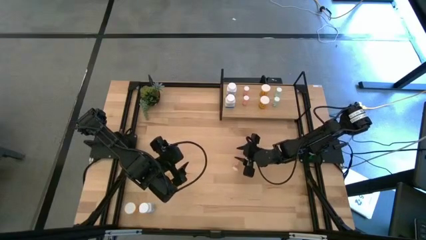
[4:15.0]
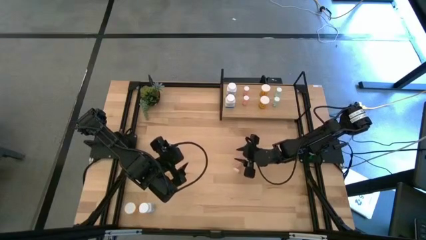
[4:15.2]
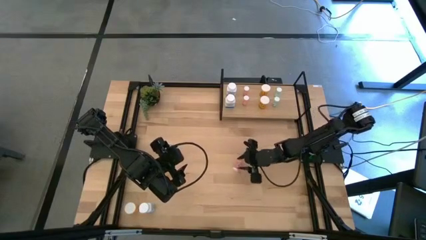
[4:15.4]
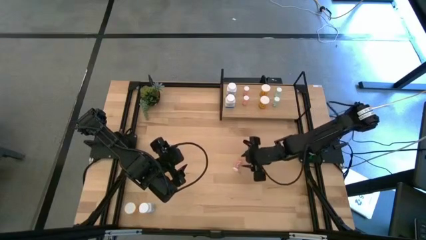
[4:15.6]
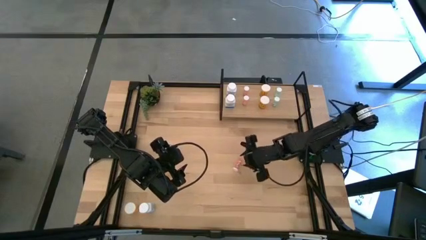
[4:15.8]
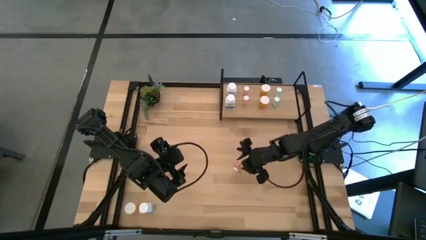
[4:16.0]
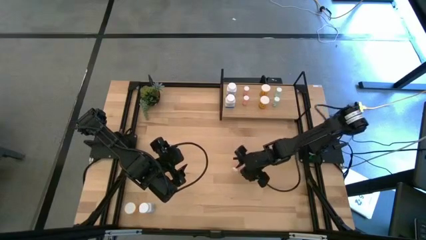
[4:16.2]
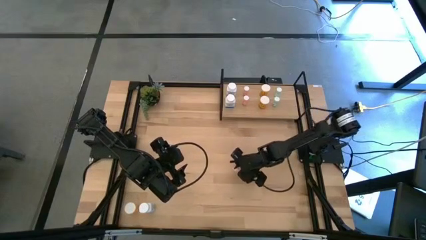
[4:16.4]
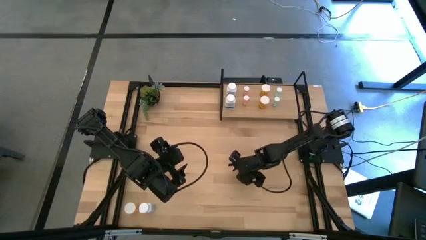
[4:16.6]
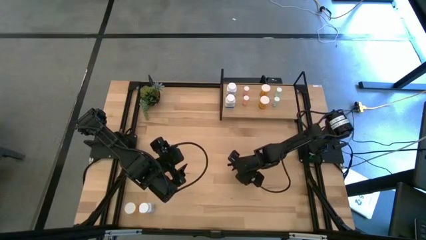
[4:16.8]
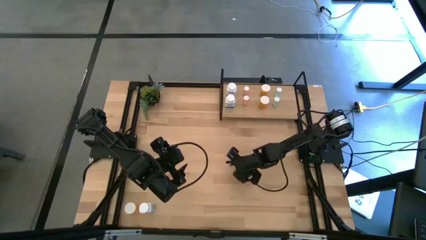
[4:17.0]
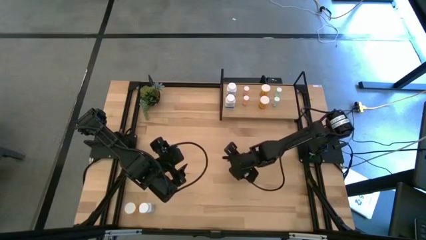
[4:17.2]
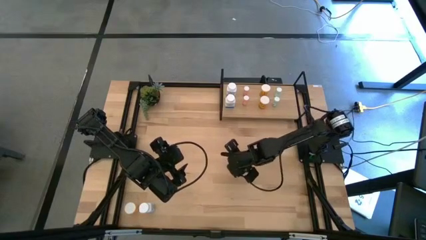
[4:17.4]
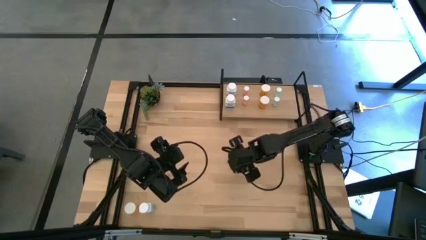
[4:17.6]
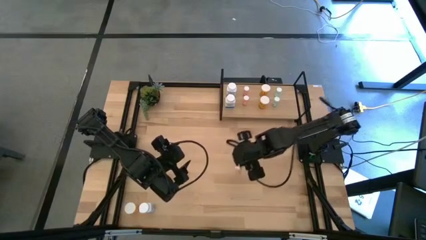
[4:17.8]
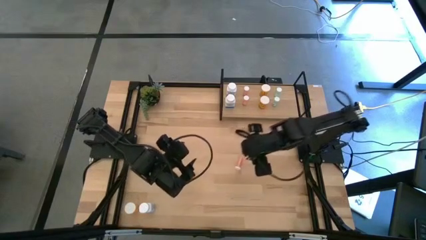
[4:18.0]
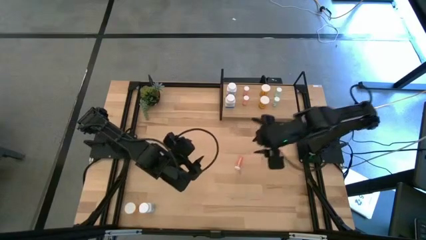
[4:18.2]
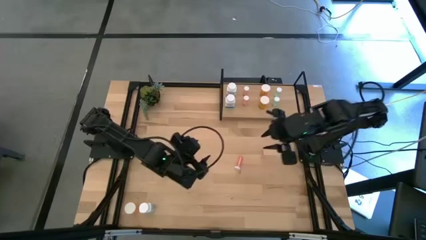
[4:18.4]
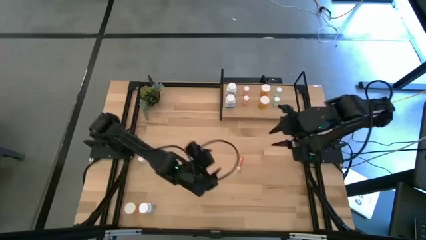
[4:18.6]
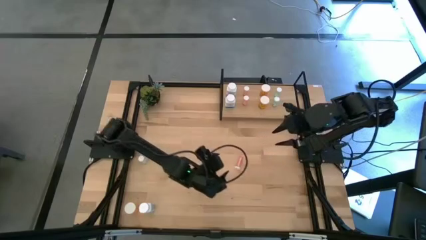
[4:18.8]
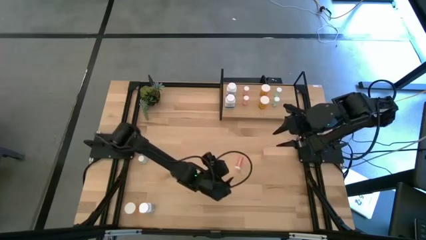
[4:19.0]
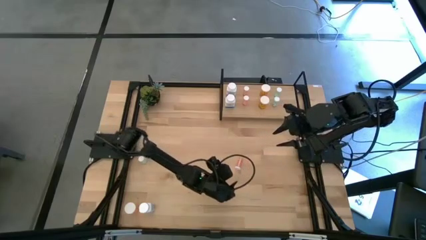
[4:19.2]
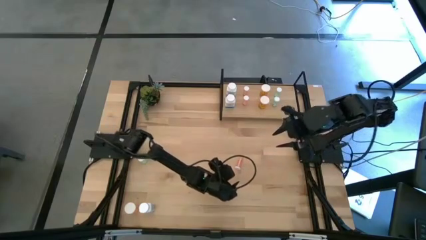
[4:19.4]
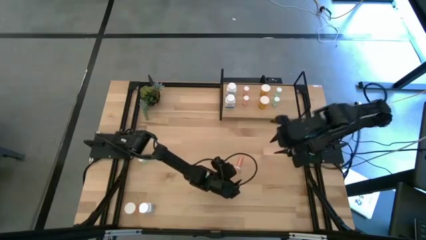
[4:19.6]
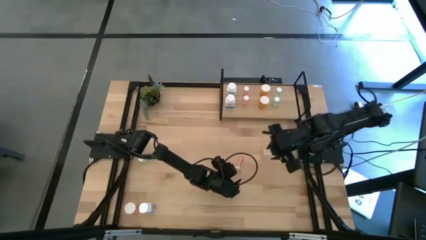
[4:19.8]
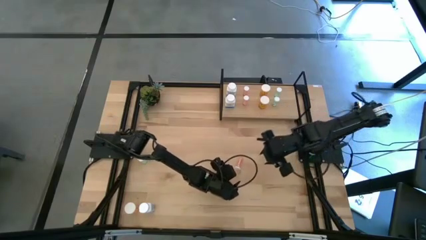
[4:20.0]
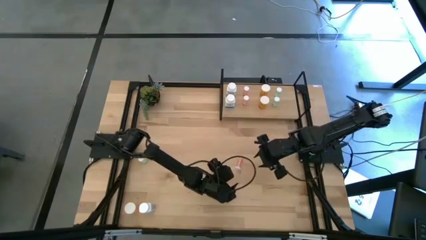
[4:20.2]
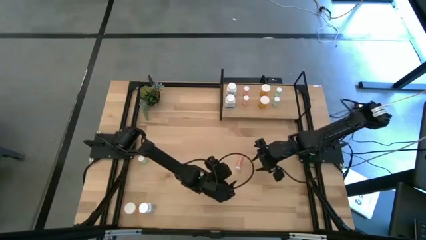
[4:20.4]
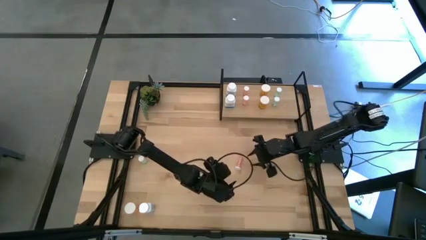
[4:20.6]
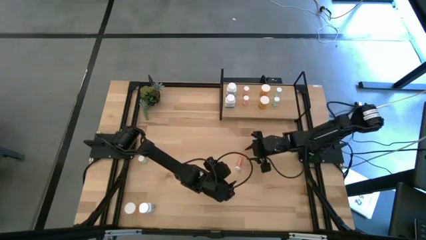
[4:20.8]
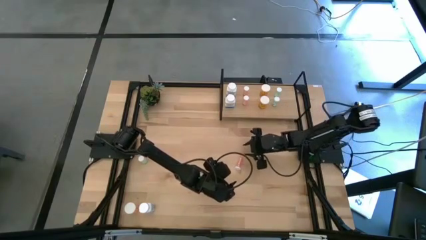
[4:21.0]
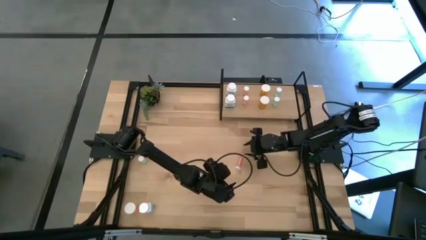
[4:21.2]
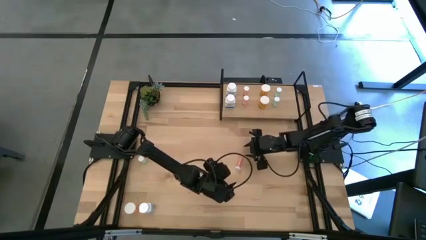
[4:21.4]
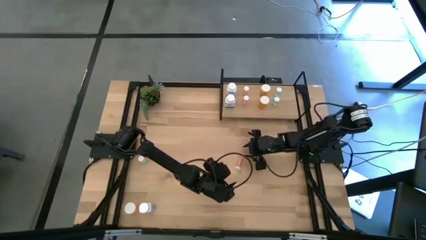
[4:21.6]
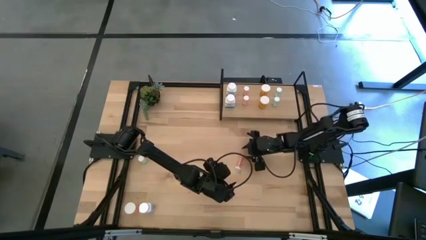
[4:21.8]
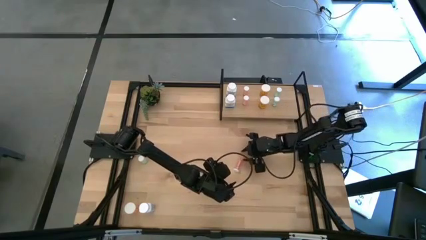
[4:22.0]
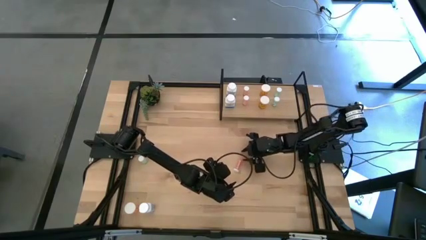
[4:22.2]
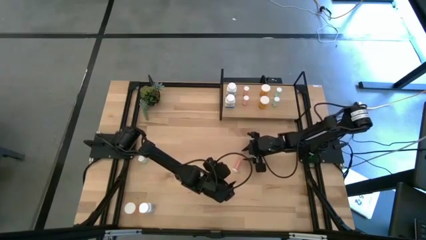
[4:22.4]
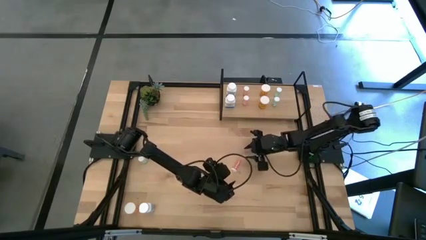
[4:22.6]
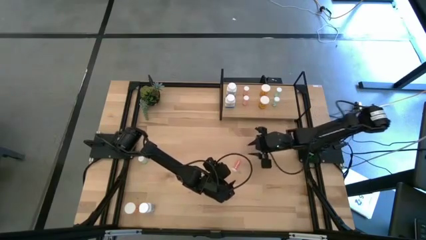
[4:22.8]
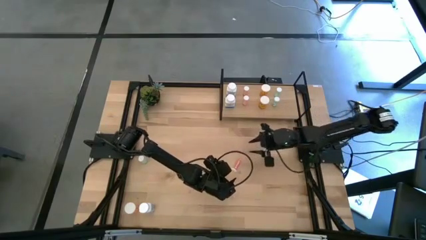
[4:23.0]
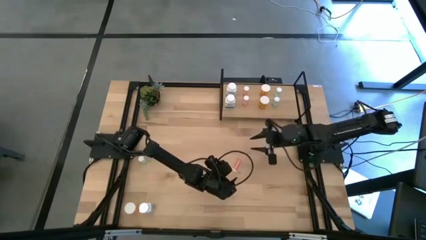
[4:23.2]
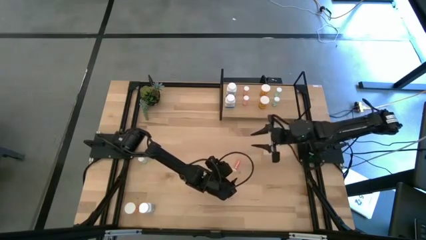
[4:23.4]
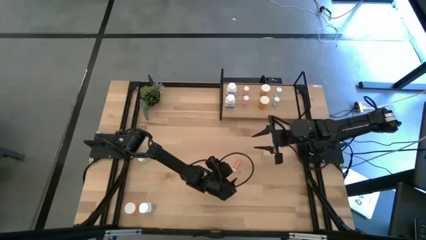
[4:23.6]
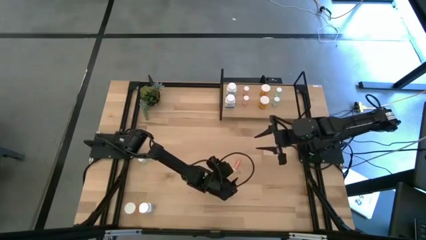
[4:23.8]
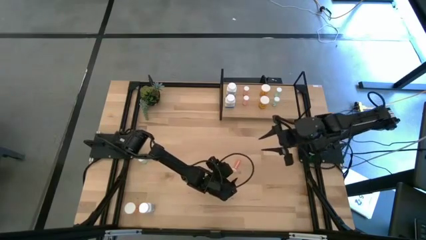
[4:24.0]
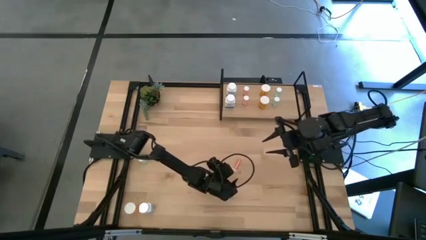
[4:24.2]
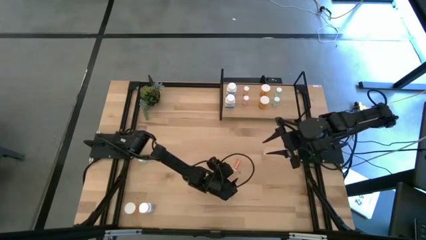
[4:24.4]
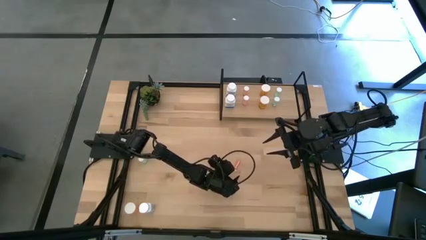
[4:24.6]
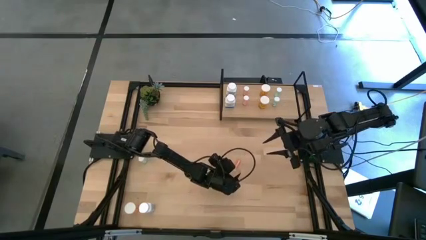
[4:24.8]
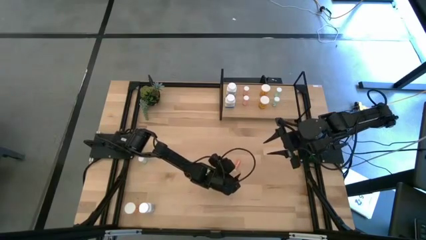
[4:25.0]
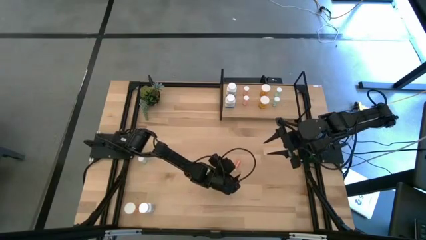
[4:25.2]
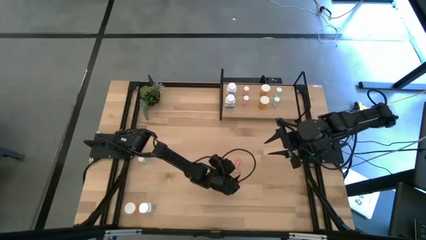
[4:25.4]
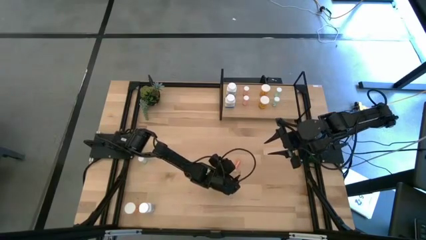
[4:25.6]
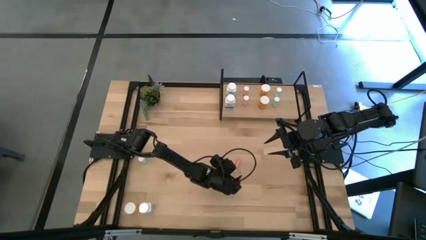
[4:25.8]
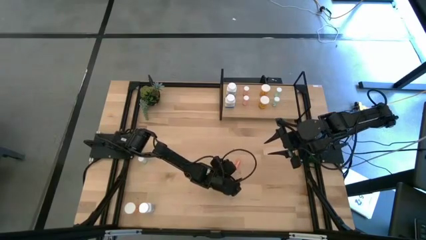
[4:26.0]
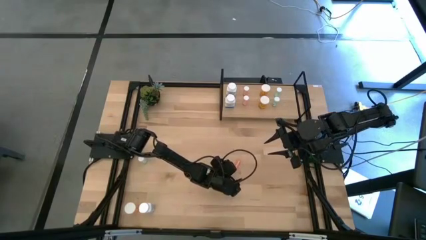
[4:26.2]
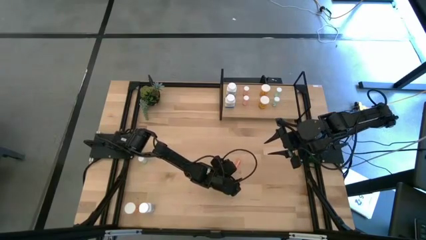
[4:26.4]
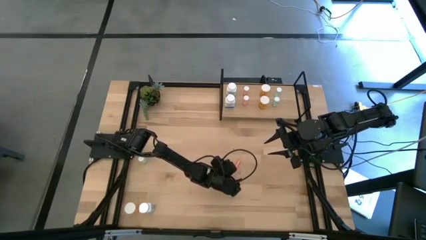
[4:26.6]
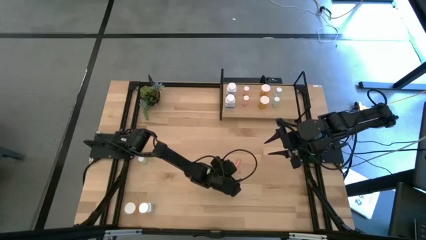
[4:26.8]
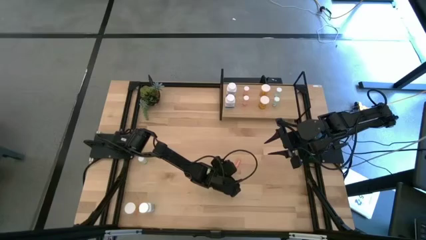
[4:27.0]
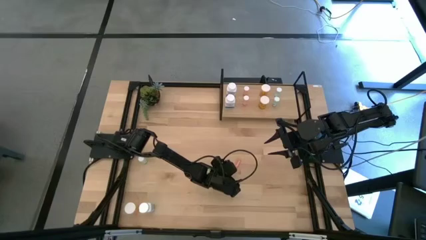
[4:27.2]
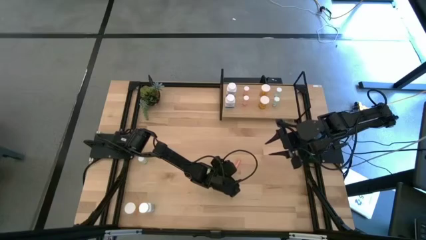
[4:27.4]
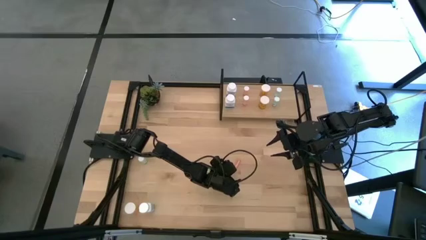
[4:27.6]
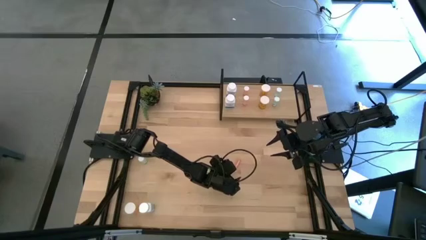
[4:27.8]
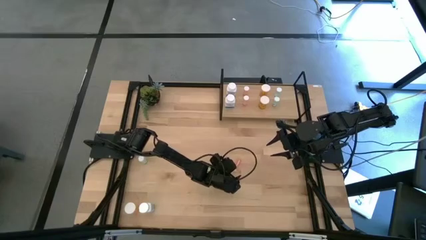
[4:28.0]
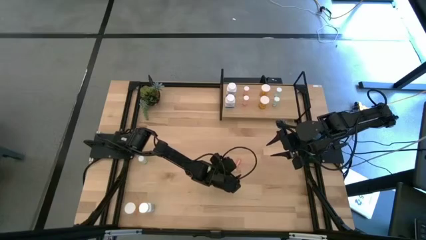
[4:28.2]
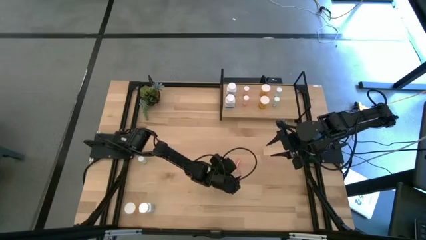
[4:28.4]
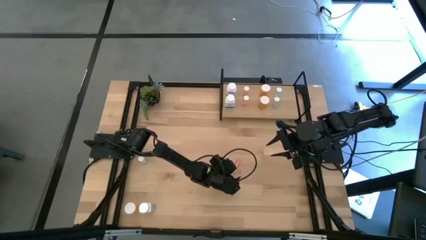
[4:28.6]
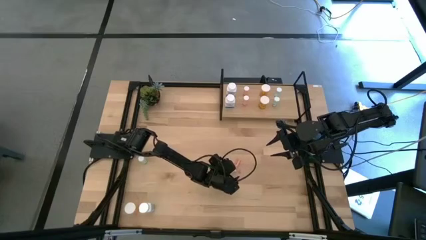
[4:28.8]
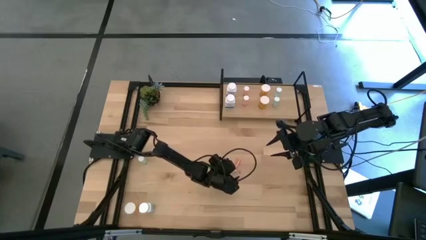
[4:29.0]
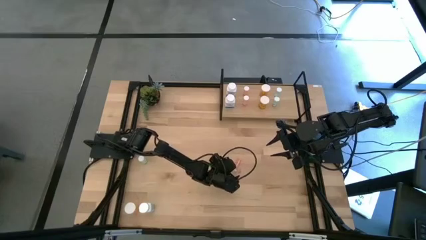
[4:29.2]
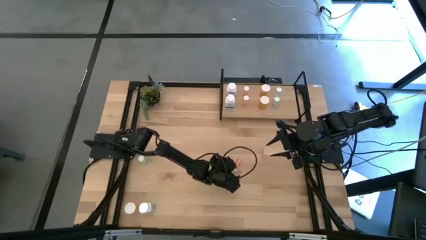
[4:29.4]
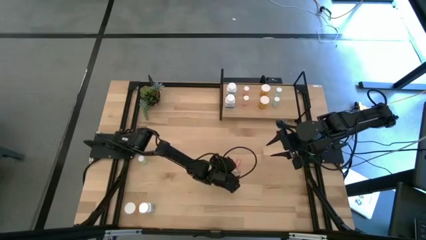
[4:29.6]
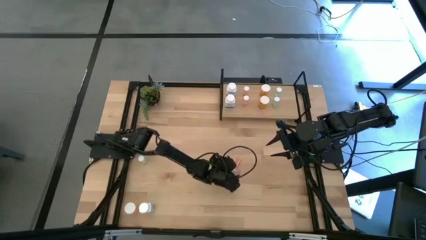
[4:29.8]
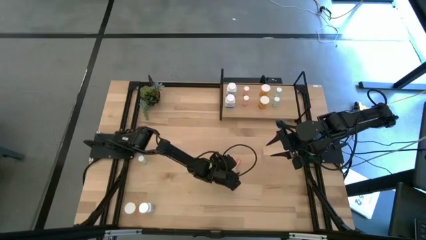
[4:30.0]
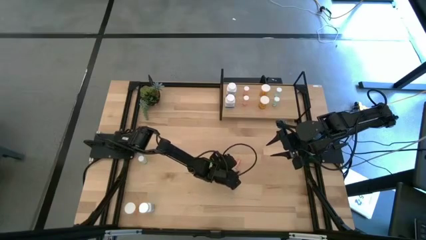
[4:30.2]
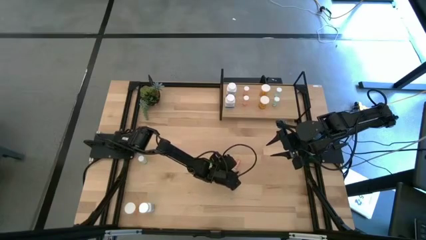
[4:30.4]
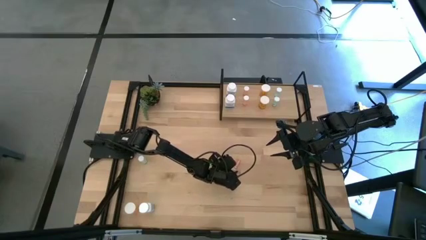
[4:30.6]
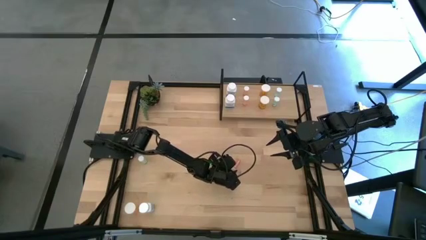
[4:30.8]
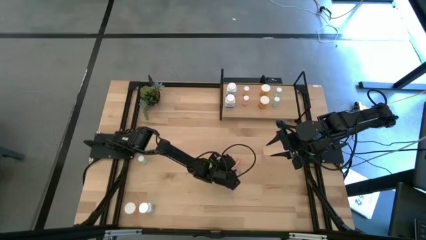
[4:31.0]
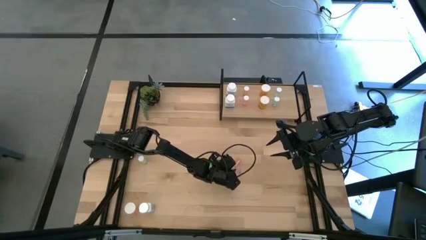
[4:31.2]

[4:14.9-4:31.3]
Task: Pick and place medicine bottles onto shelf by color
Put the pink pill bottle on the shelf aligned with the other pink pill bottles
